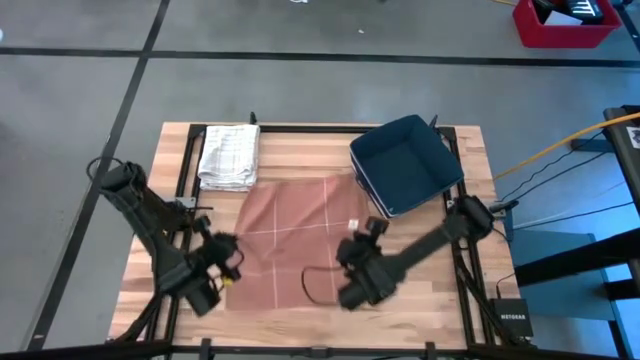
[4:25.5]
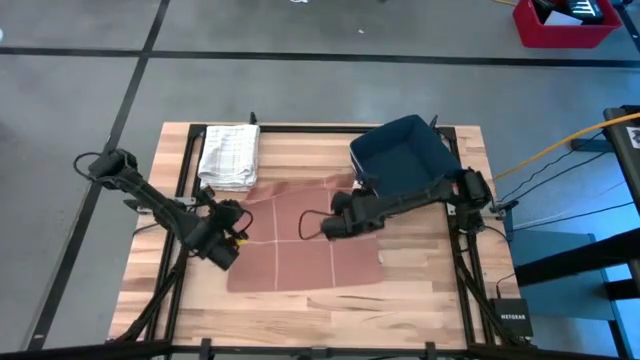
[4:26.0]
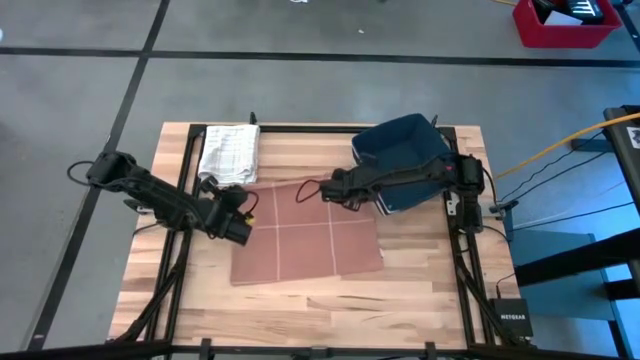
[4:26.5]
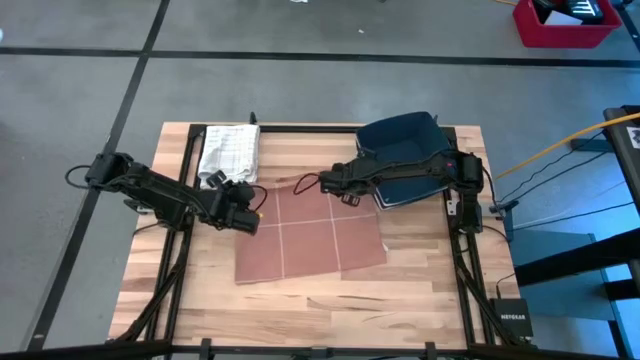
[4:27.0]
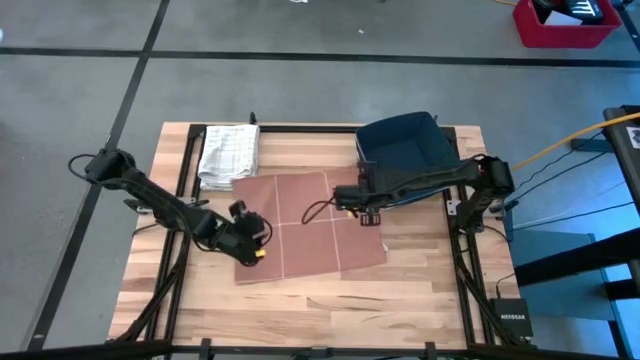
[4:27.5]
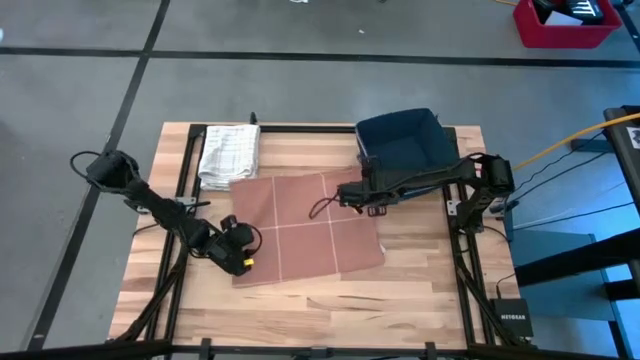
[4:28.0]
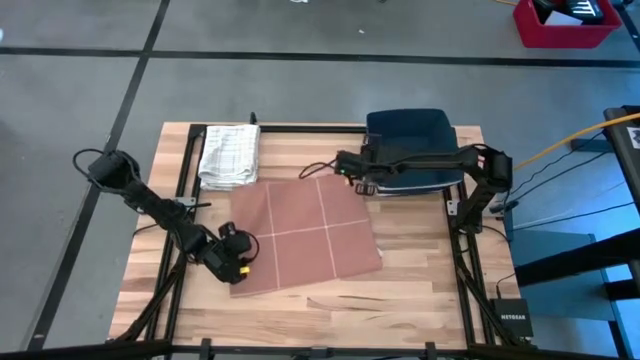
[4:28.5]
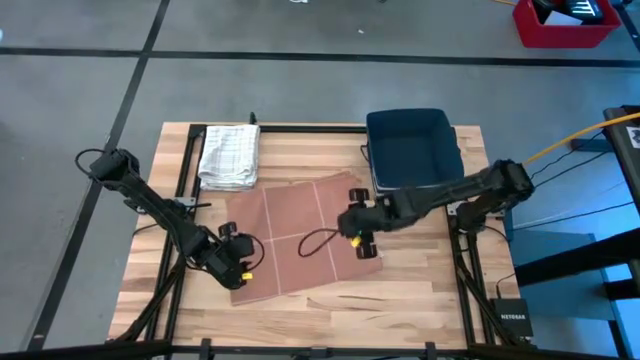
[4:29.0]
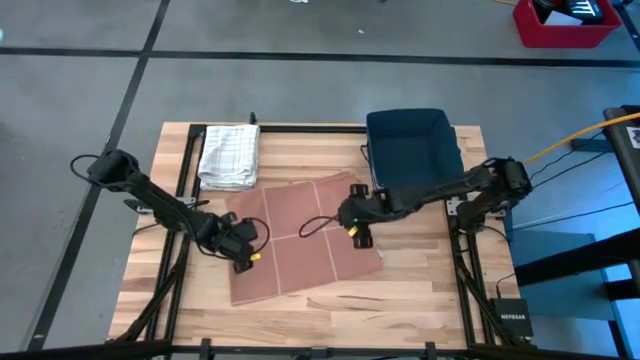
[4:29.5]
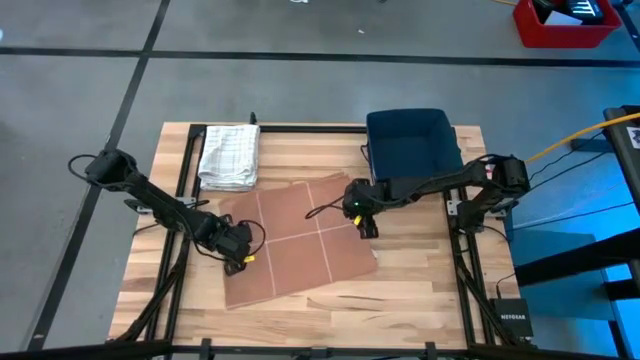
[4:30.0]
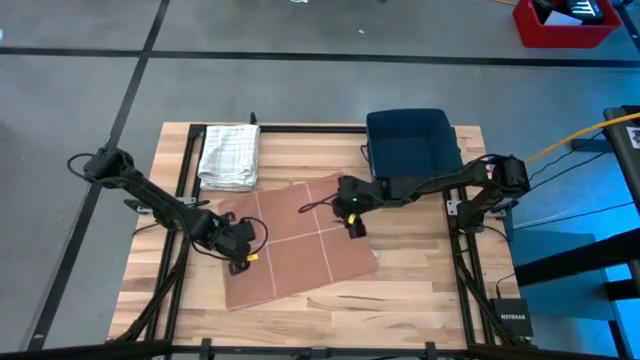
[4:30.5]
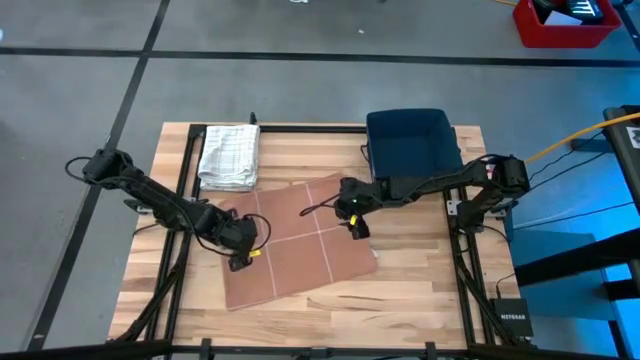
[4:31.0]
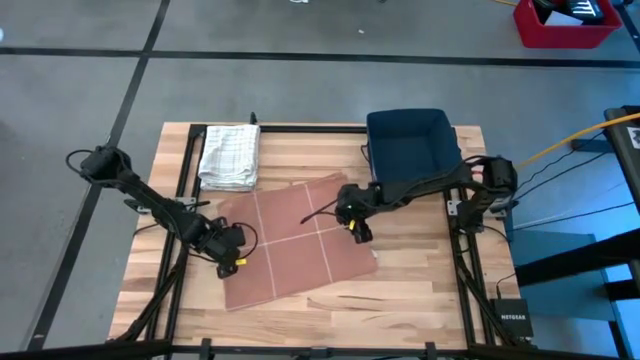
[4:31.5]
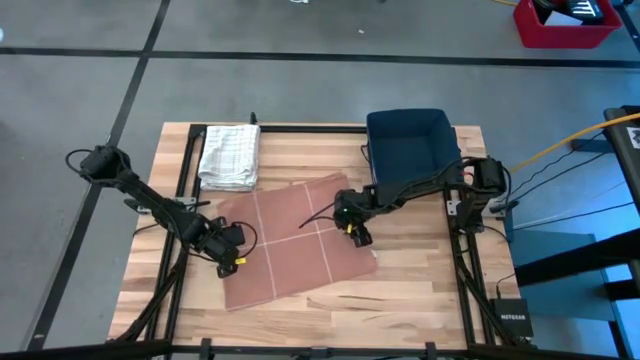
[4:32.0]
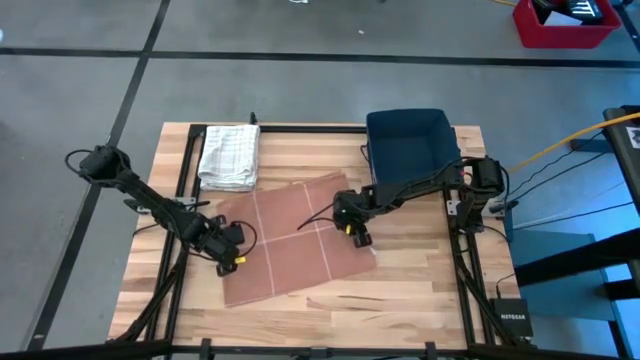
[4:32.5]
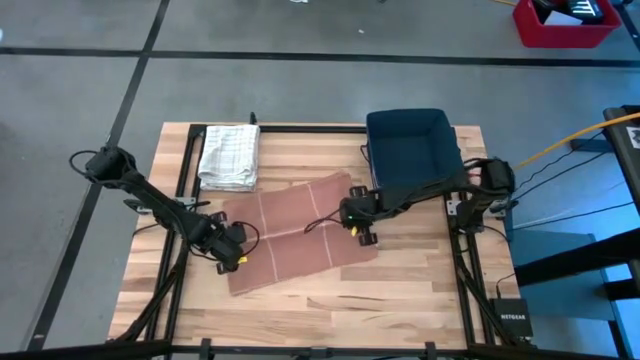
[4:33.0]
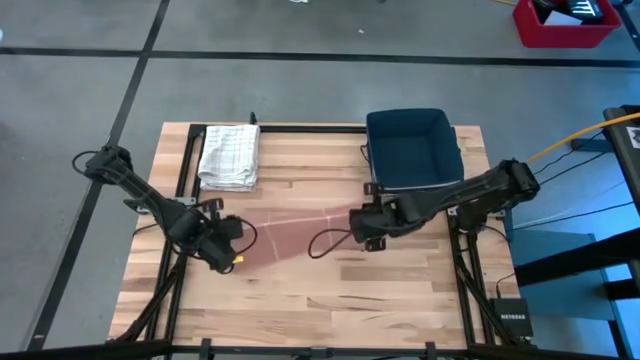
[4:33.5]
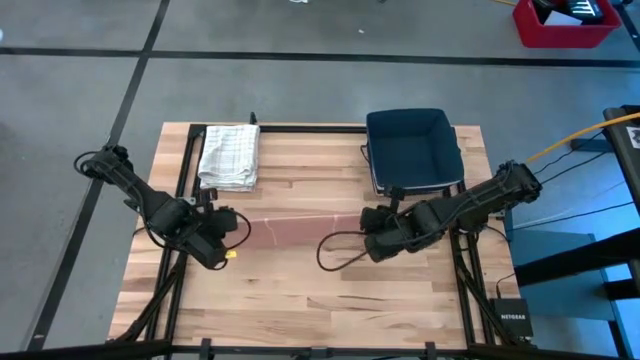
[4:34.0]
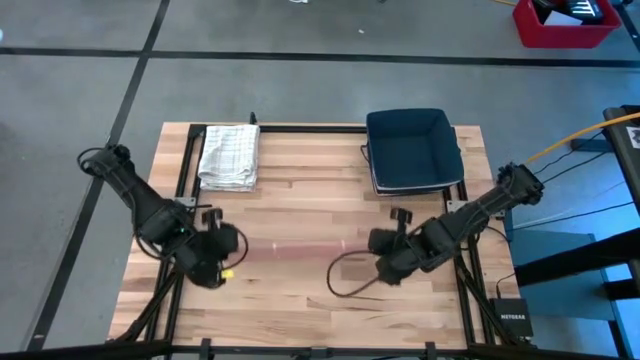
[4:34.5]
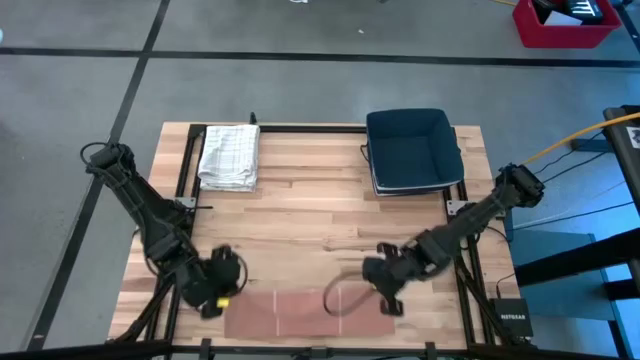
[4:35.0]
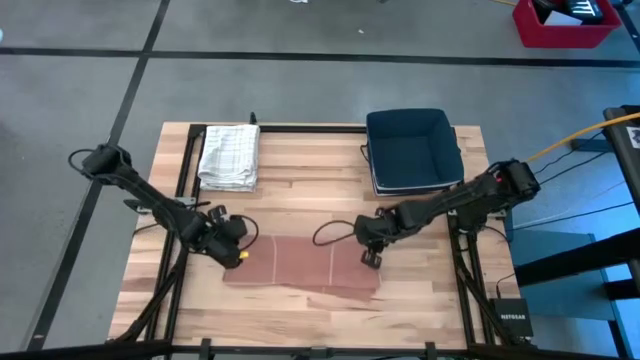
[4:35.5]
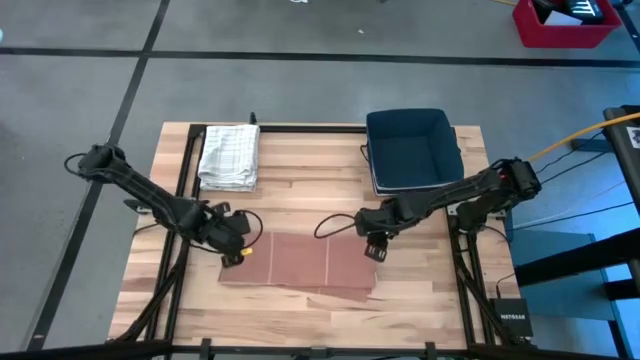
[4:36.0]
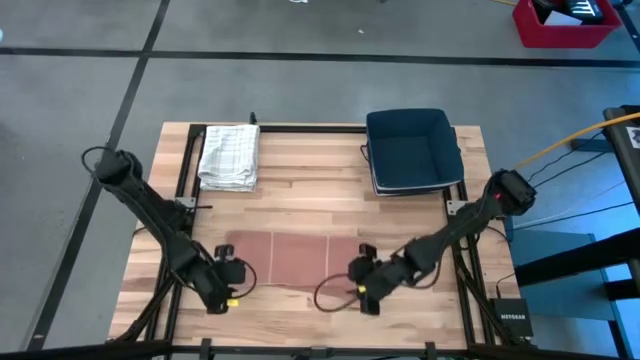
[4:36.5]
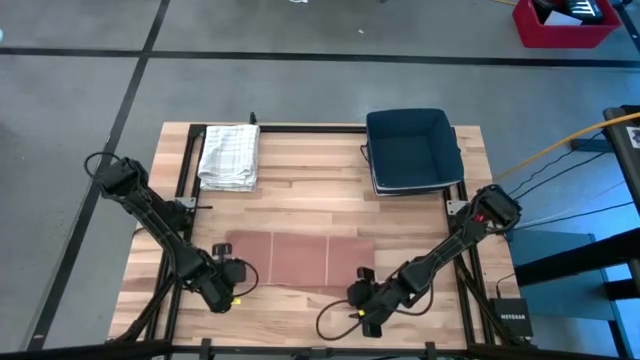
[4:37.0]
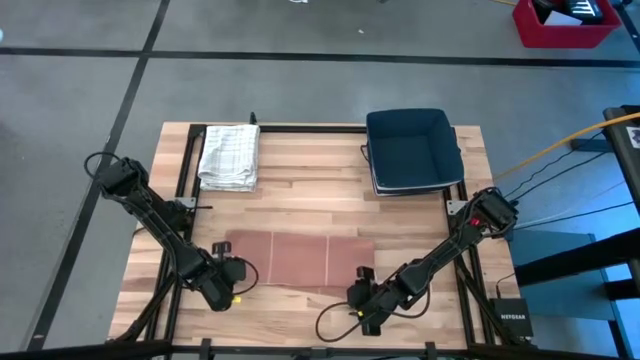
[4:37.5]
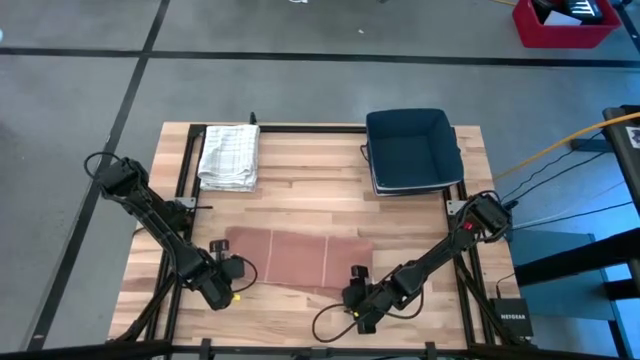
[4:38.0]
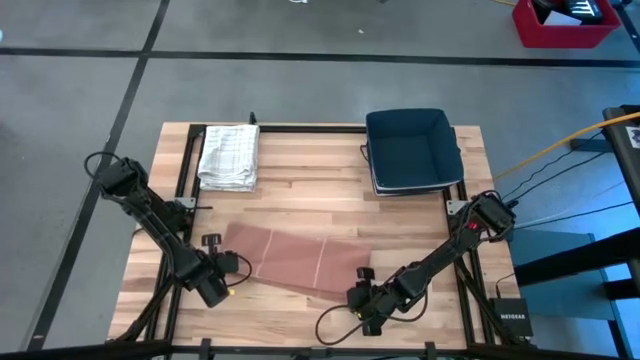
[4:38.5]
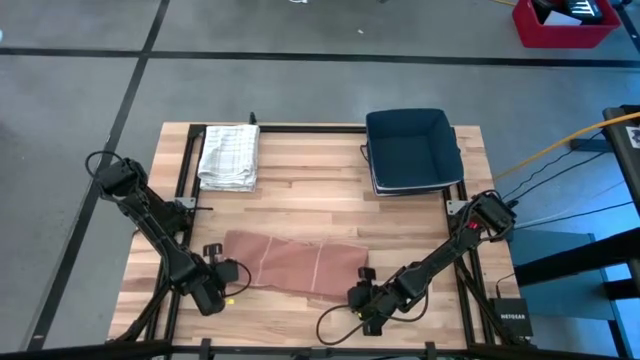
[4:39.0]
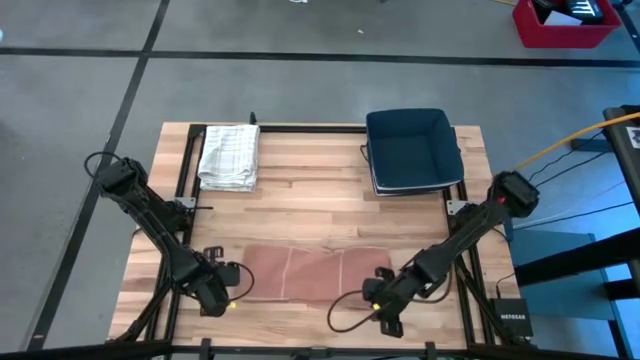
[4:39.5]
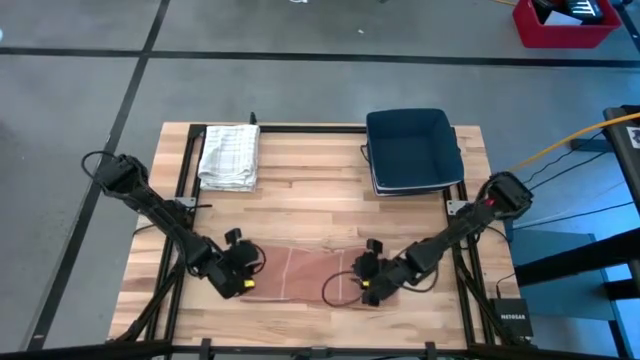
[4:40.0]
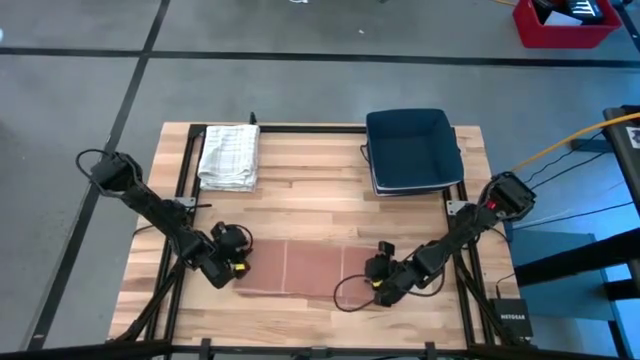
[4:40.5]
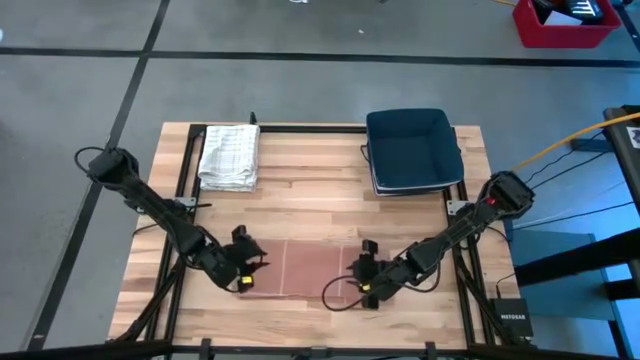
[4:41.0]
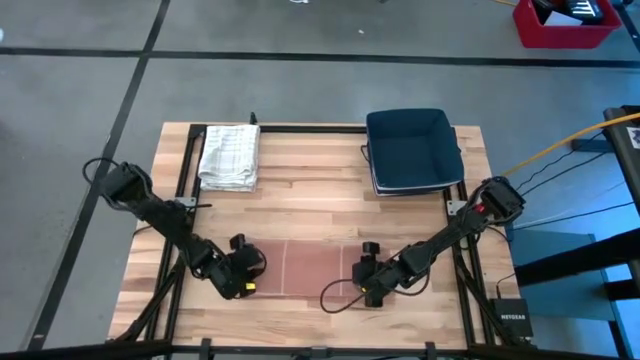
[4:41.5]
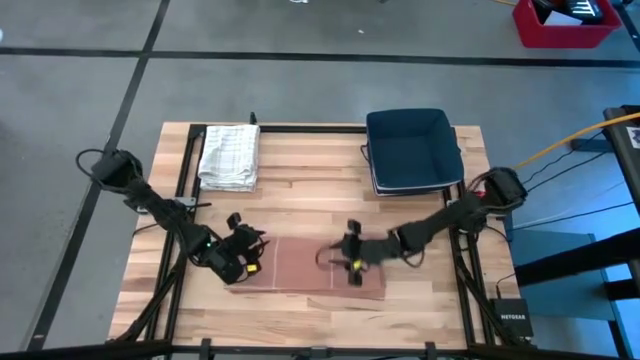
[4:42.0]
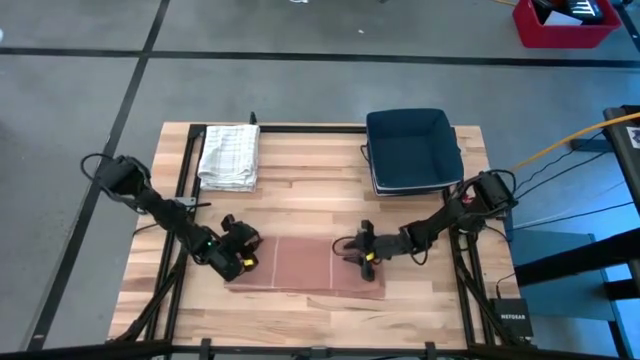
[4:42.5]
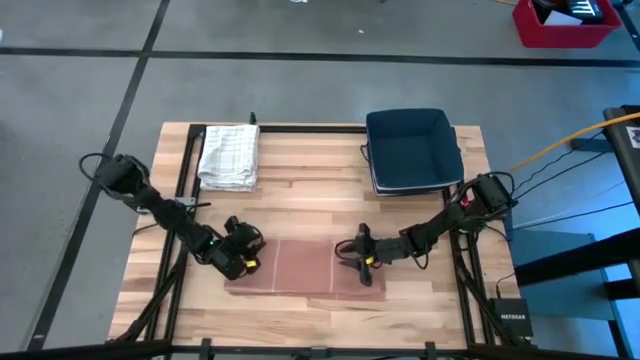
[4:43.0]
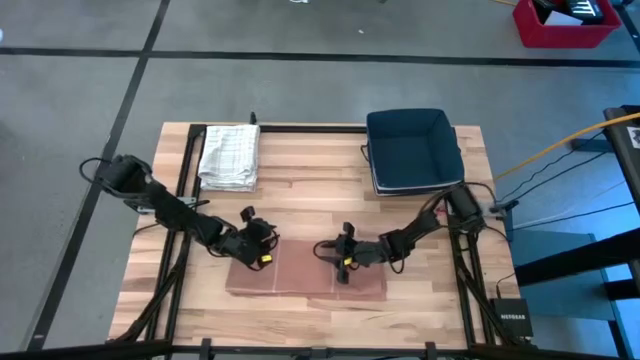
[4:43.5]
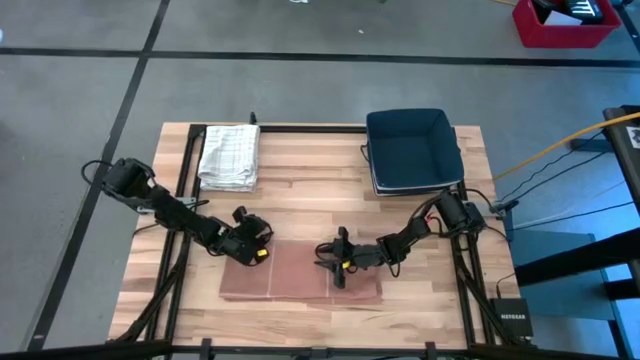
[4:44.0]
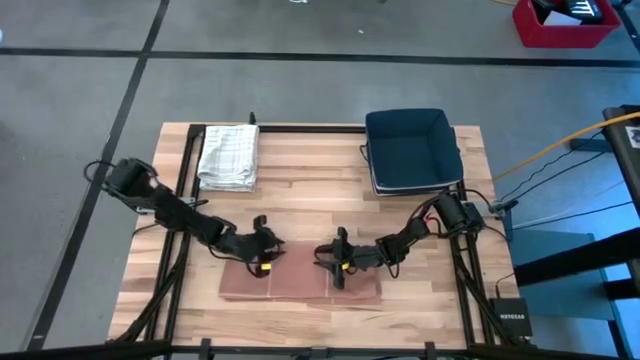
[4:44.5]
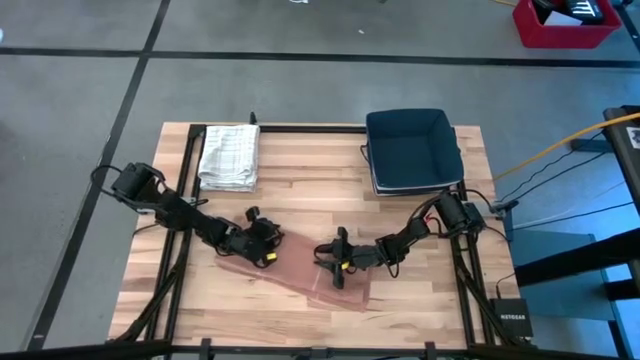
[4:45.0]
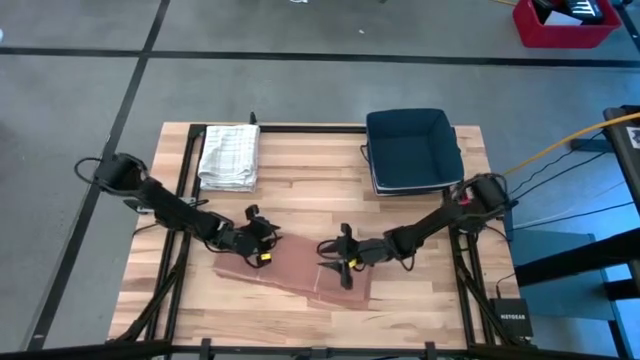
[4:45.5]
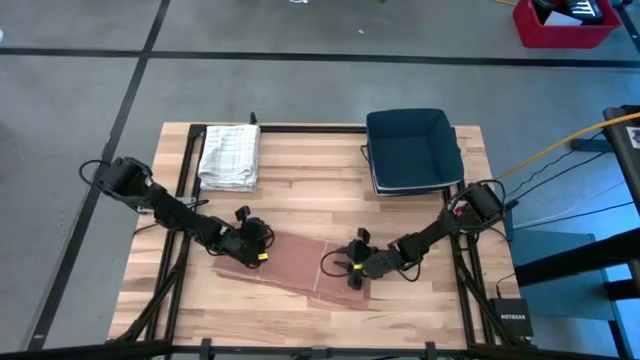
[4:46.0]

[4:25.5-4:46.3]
Task: Fold towel
Fold the brown towel on the table
